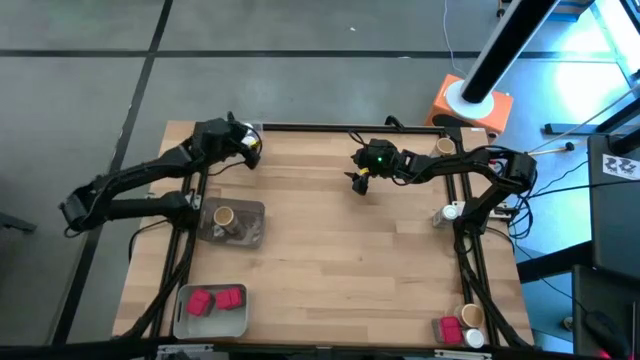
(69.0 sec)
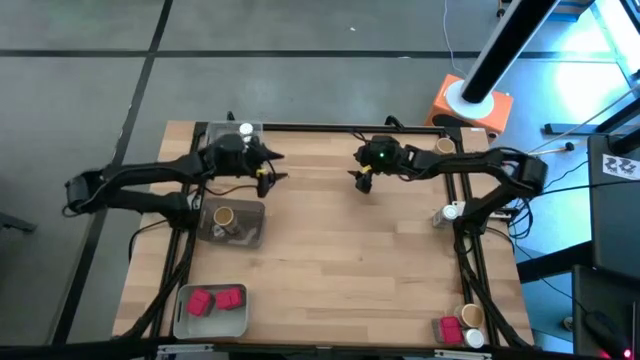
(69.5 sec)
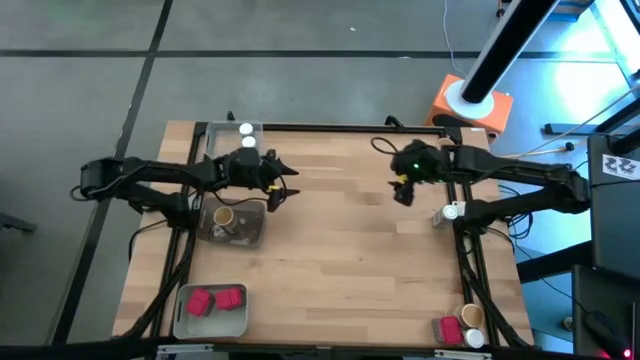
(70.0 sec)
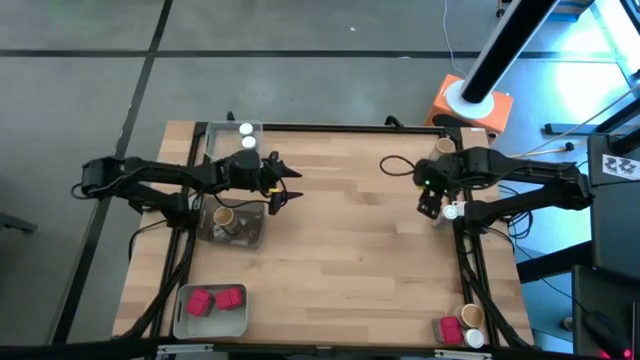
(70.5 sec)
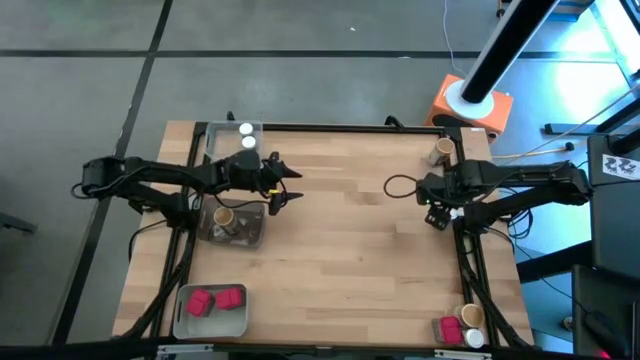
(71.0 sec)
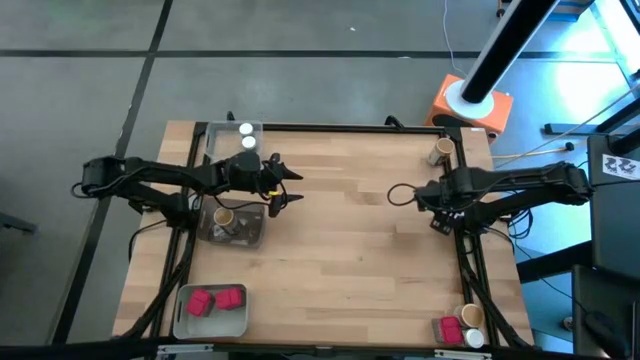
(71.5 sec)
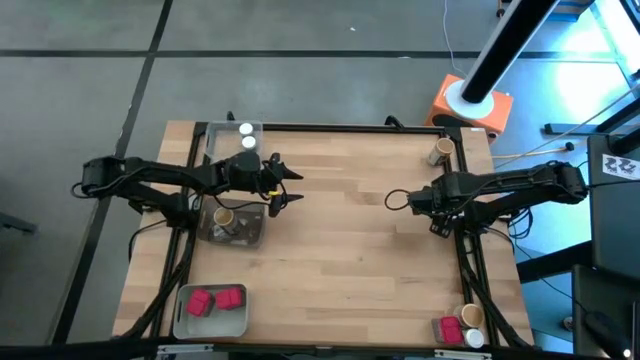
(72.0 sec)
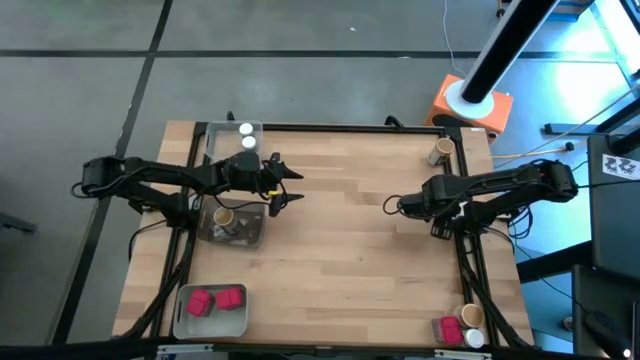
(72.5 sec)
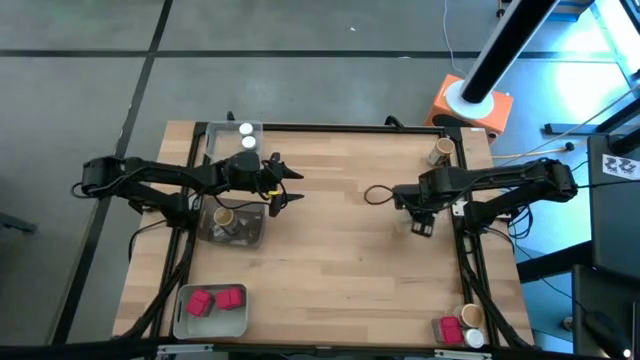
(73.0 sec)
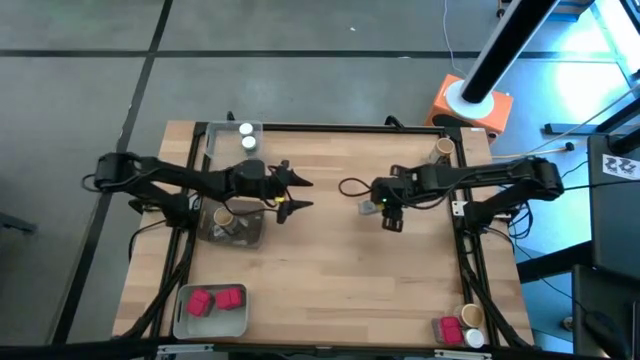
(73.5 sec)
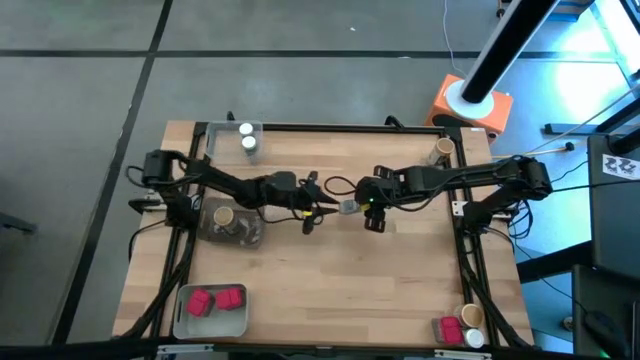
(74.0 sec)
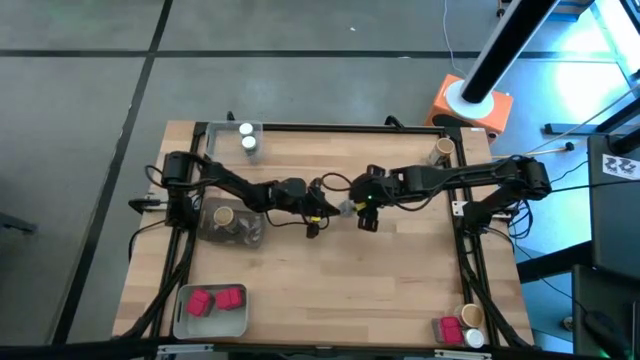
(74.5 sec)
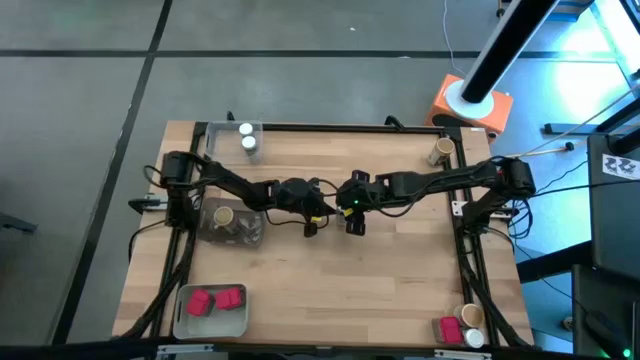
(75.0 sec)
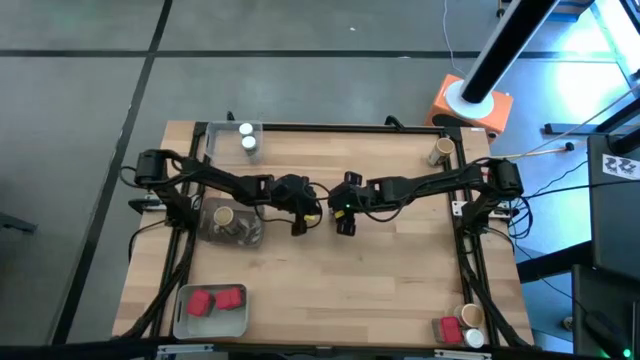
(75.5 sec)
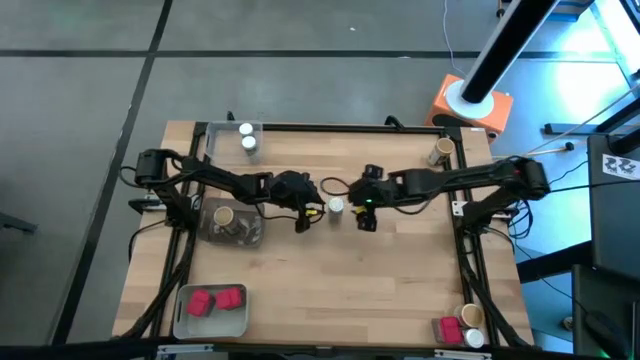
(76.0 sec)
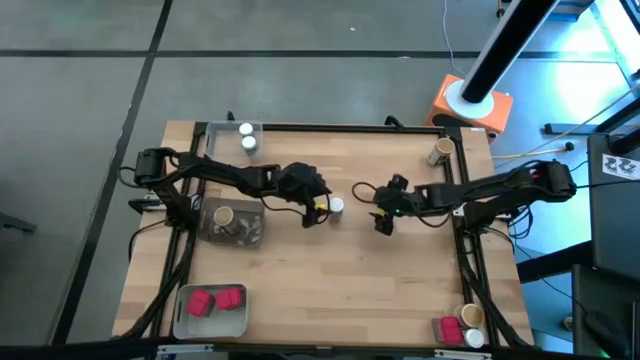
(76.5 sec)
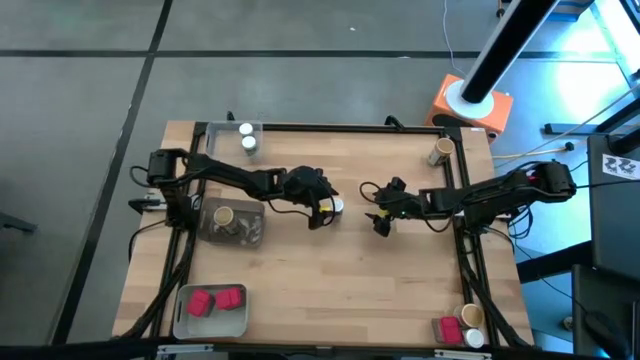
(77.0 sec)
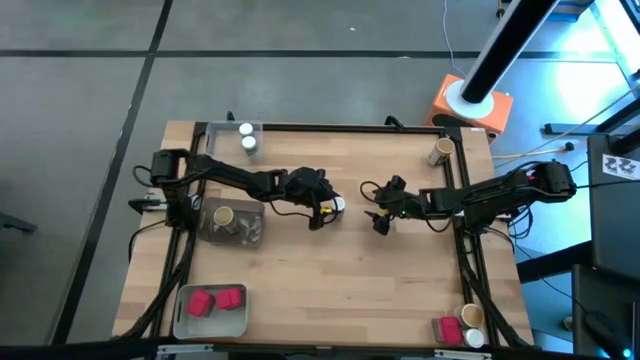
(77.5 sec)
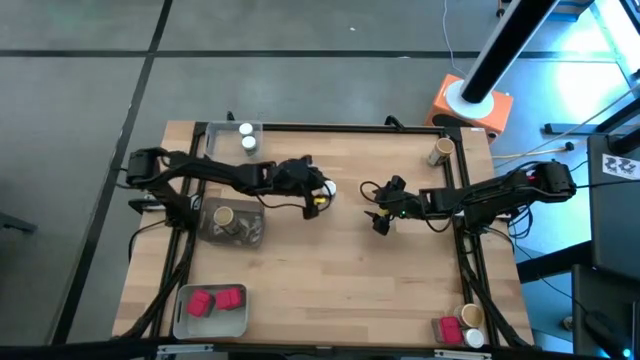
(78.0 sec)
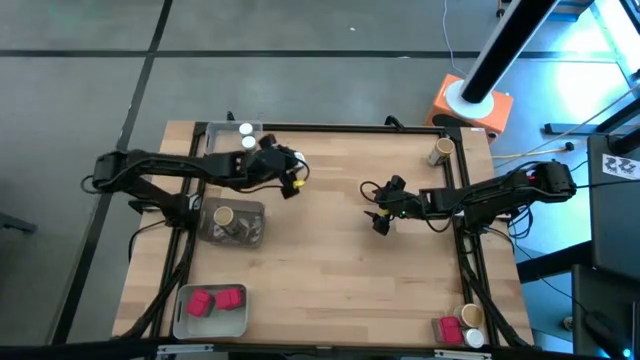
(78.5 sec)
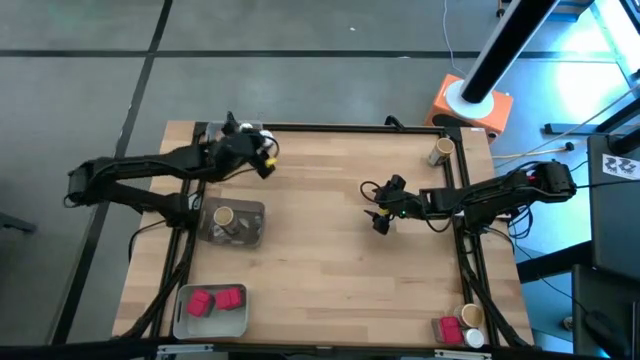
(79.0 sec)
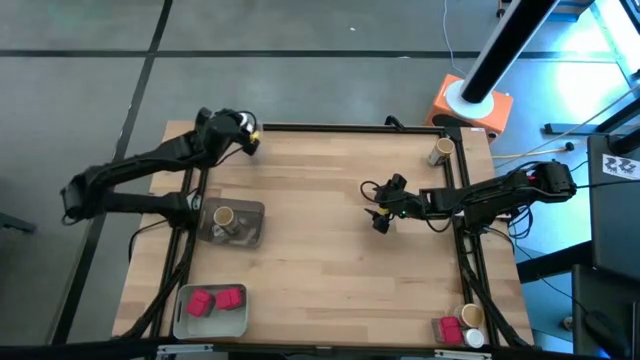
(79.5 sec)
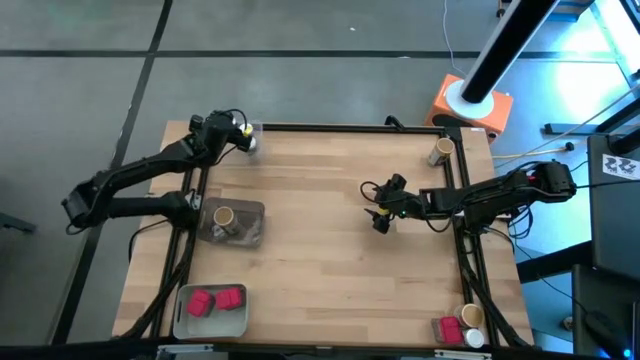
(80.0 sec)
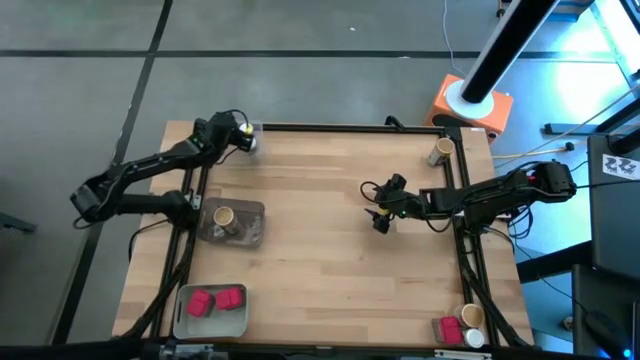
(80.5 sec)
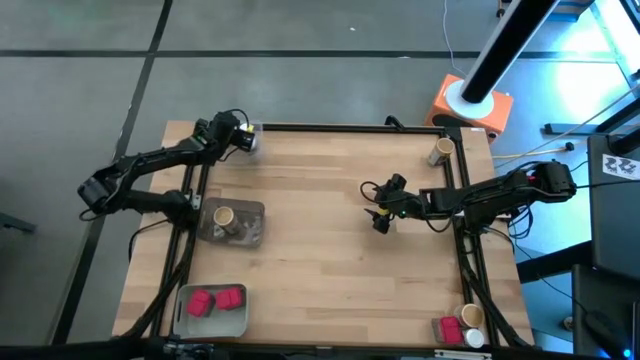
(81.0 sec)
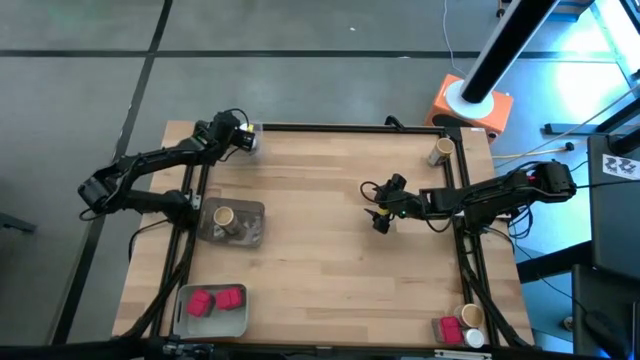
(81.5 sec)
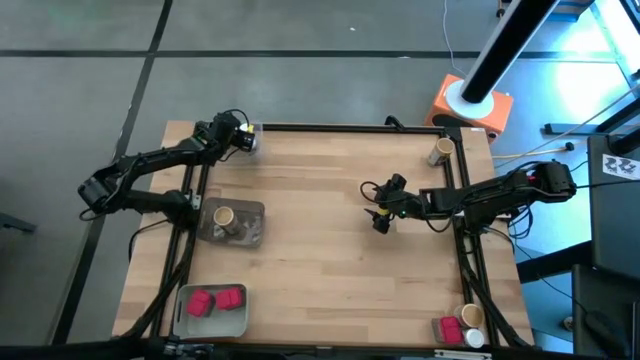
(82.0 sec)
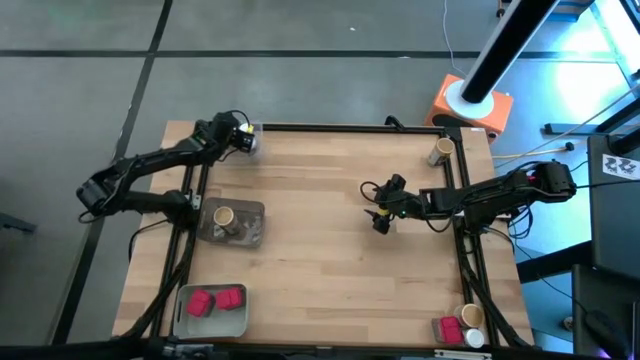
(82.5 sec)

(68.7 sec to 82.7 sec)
Task: Sort spices by type
Put the top white spice bottle into the transparent bin

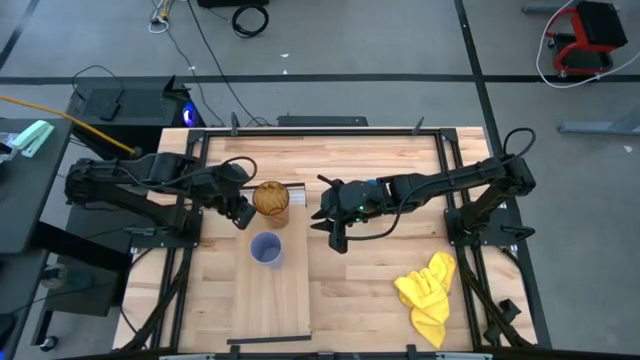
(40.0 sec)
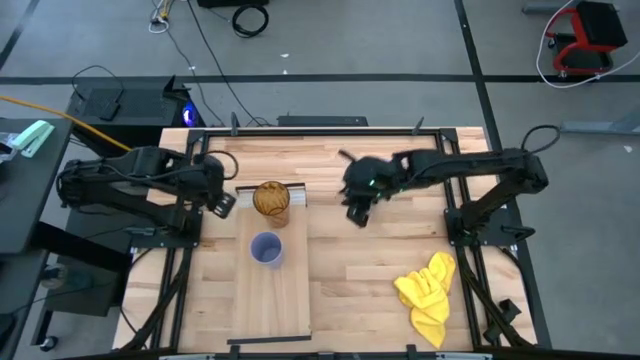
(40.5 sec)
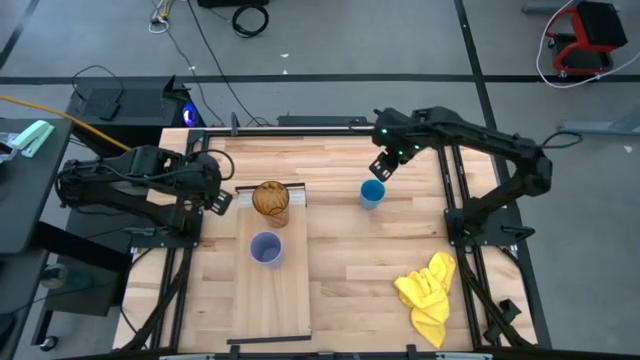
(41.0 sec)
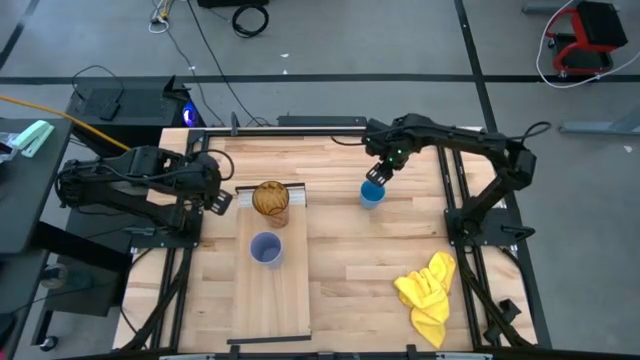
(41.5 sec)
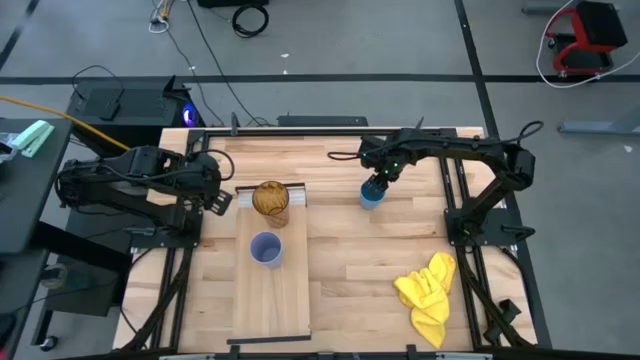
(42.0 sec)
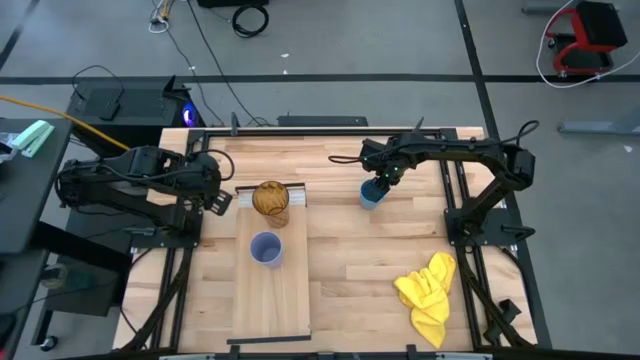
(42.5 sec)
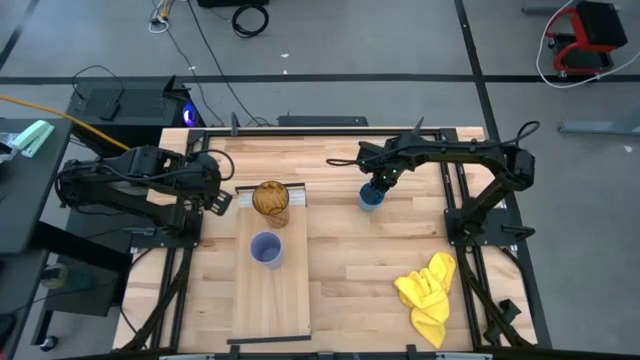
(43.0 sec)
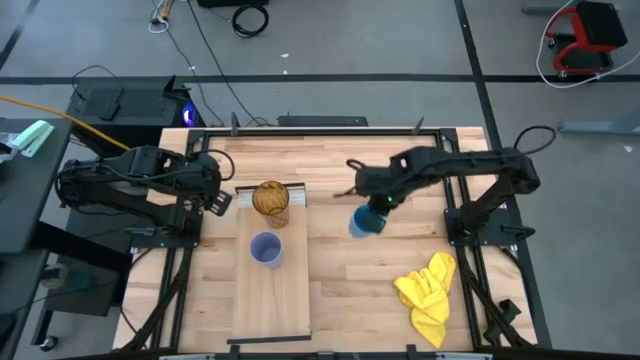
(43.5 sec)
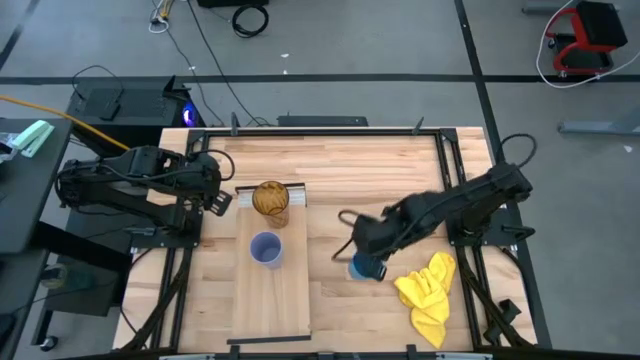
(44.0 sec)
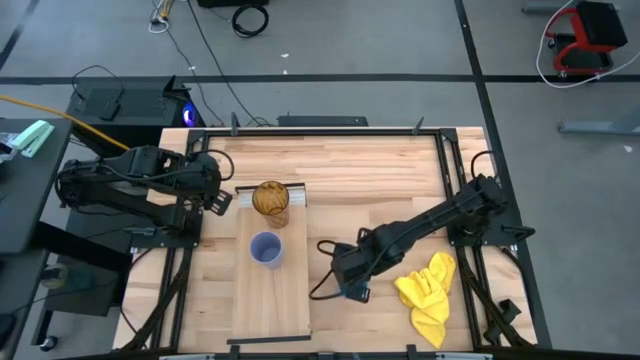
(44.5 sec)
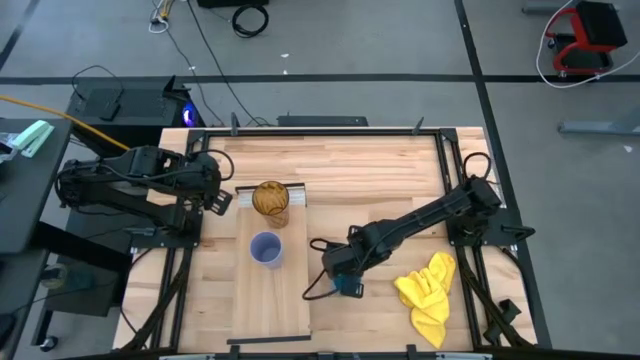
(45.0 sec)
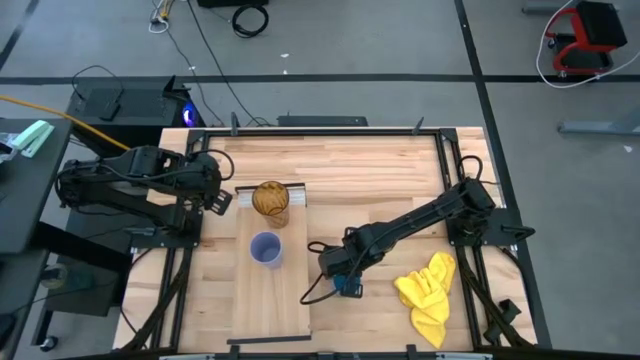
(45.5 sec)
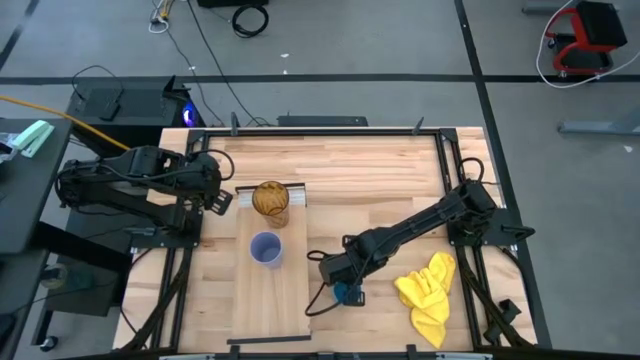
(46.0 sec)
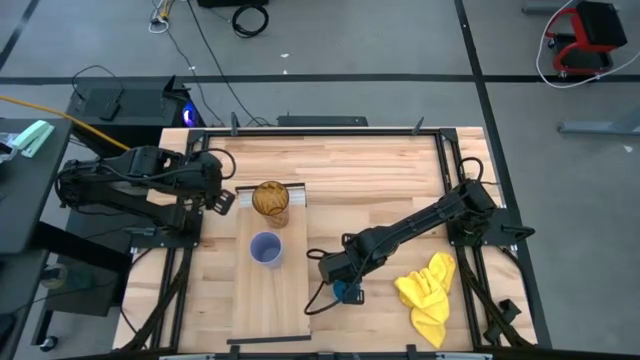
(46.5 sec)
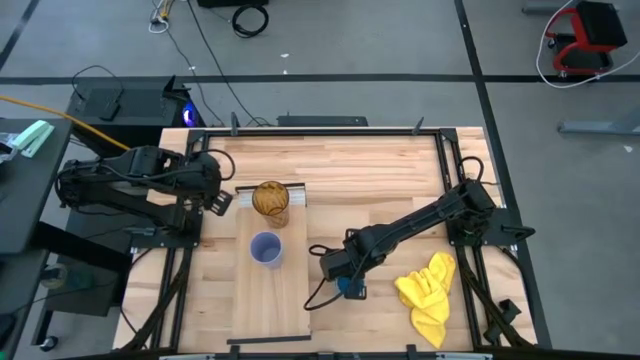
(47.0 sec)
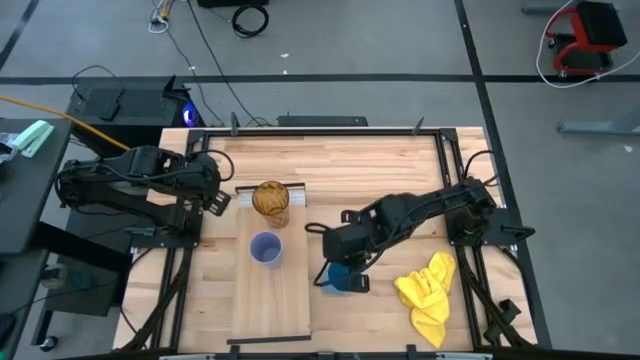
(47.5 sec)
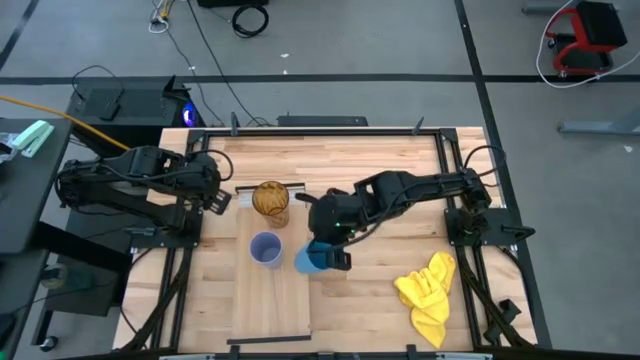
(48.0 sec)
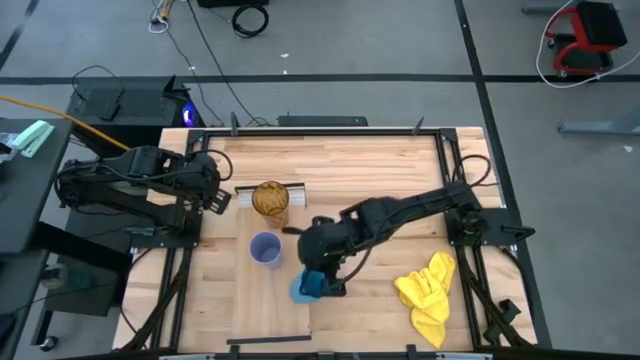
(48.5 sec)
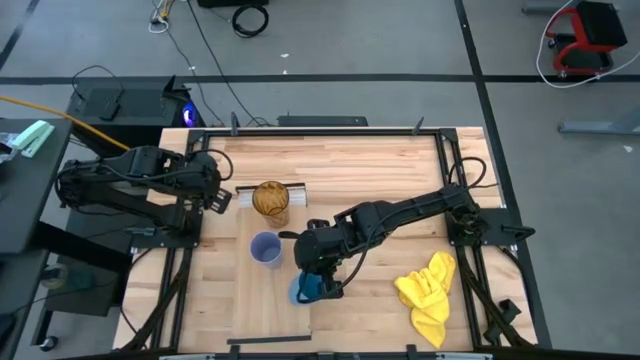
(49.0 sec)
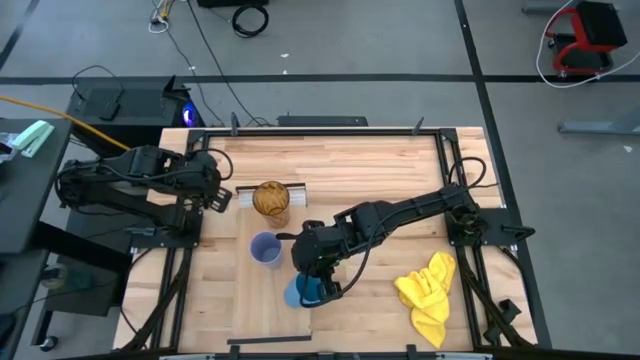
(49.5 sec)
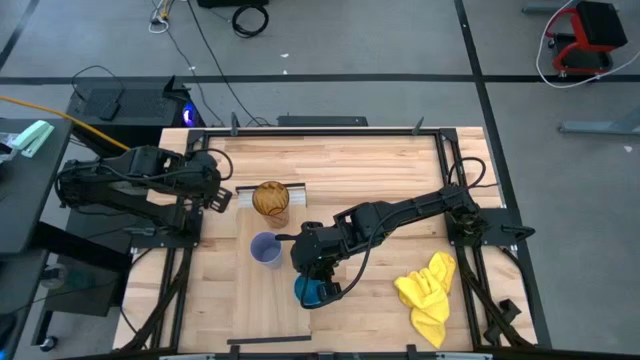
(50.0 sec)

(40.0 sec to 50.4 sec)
Task: Stack small to large cups/mugs on shelf
Put the light blue cup on the shelf
